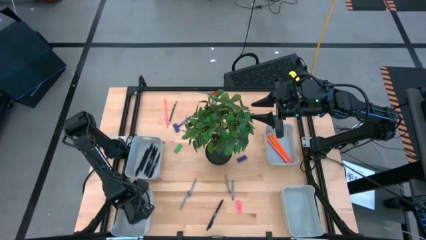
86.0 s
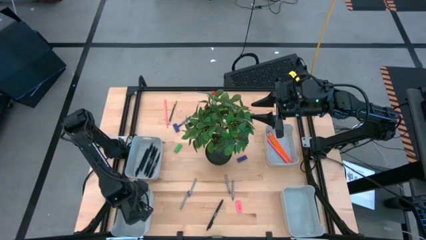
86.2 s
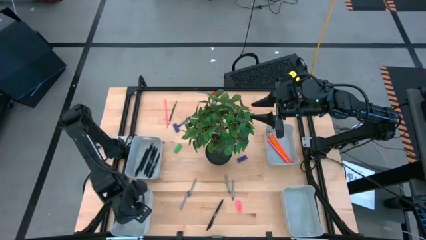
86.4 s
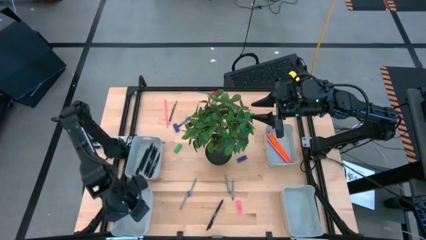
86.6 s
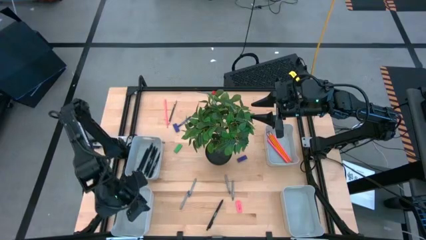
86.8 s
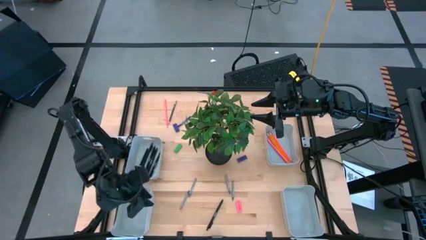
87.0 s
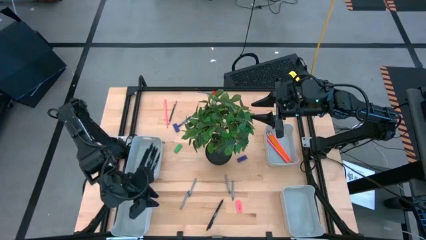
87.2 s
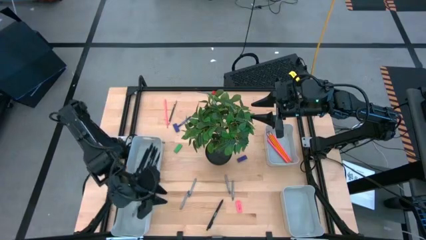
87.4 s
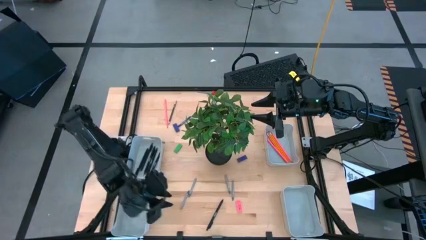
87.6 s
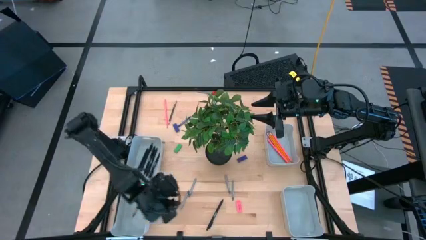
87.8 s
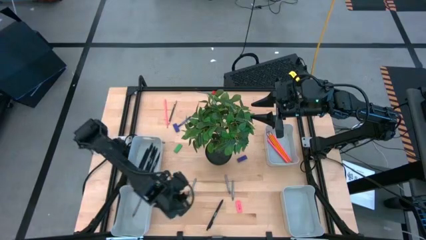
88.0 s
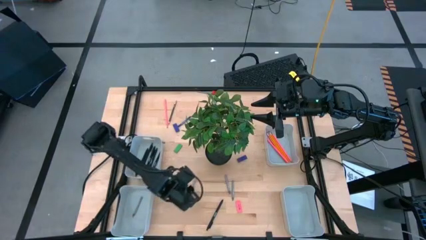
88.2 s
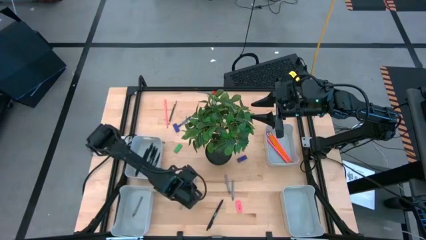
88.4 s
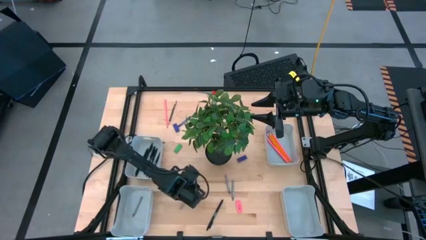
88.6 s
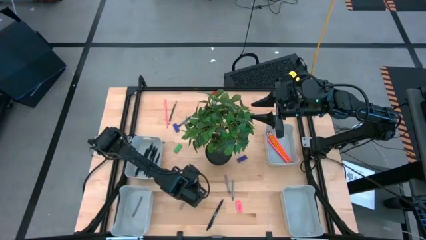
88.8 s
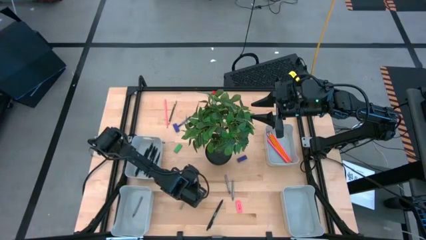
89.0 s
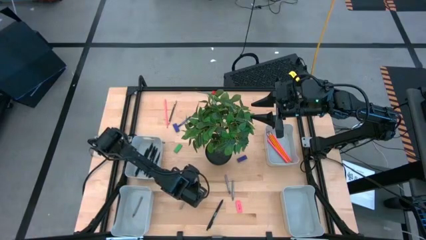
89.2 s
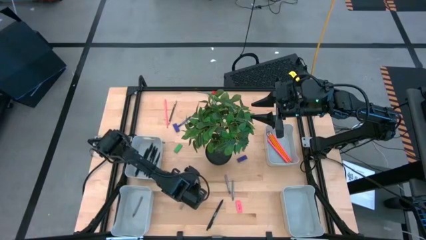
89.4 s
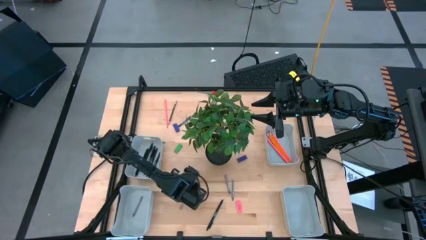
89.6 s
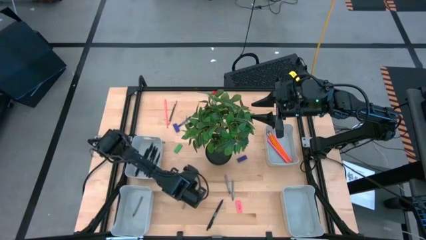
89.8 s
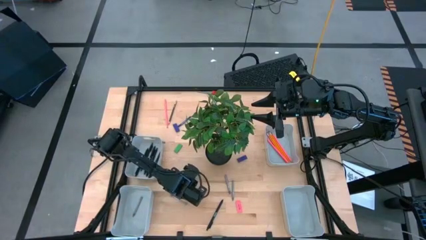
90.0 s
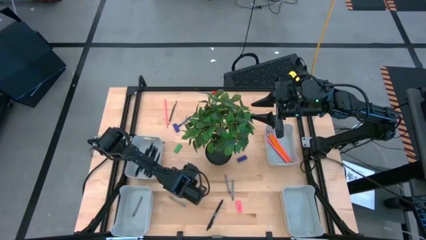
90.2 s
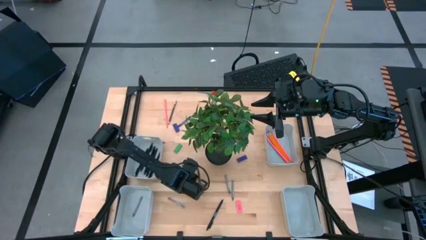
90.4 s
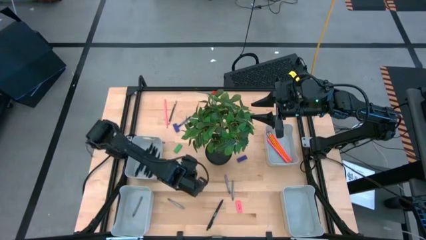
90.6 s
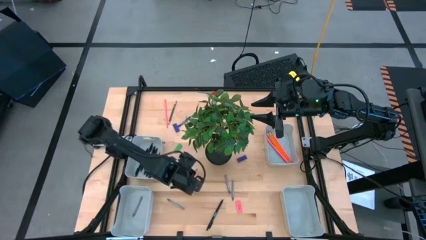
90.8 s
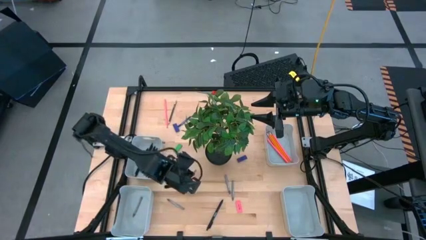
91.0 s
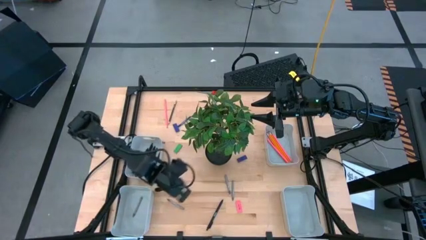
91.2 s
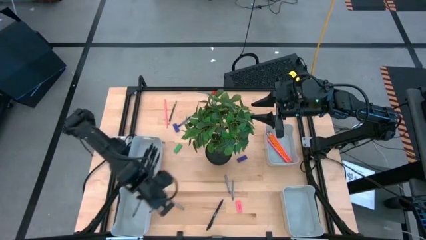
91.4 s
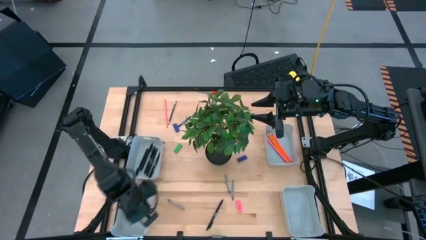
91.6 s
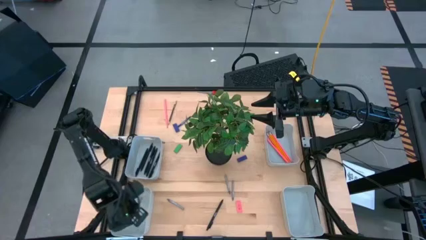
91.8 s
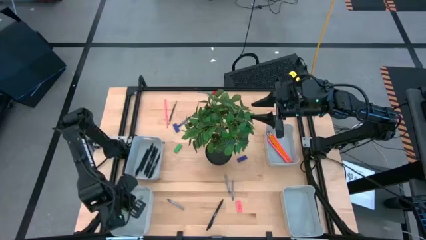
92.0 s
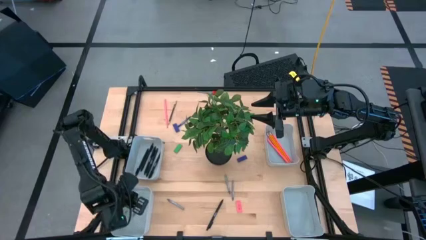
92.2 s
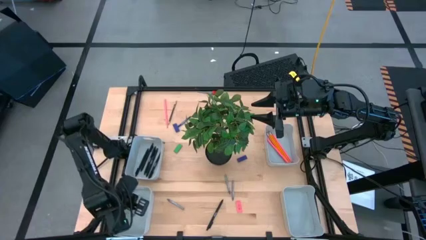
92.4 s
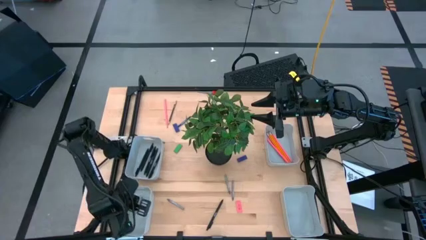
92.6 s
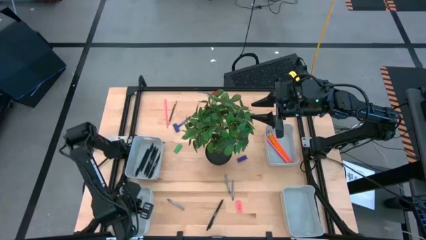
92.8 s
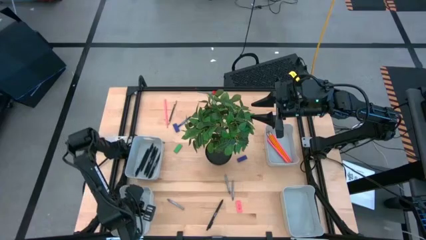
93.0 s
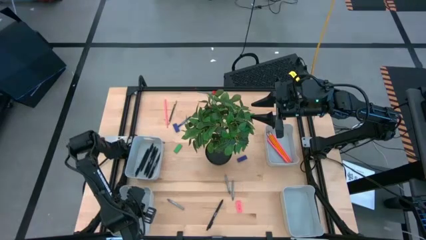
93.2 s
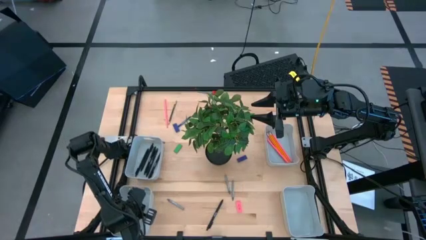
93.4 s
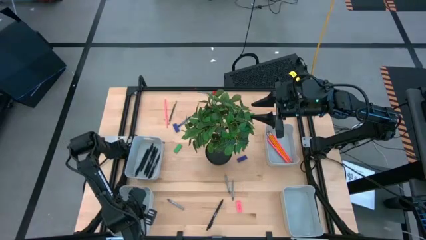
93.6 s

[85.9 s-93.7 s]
Task: Sort crayons/erasers/pens/pencils in bins
Put the gray crayon into the bottom left gray bin

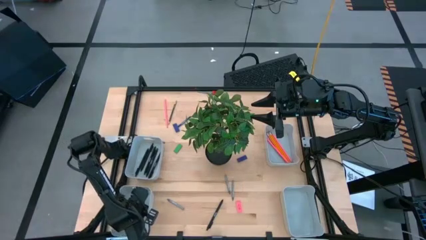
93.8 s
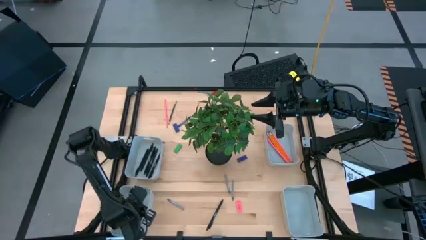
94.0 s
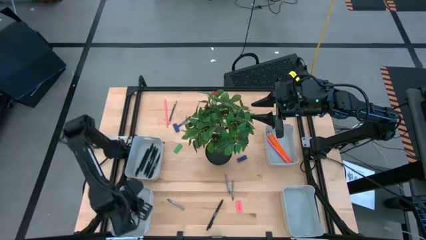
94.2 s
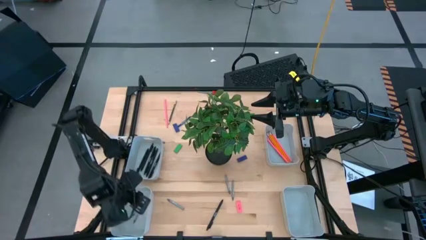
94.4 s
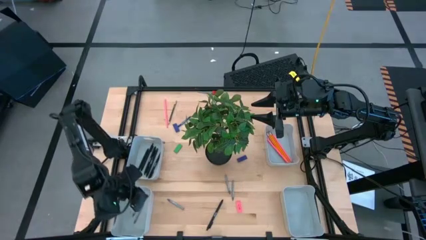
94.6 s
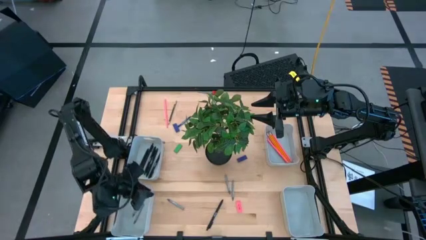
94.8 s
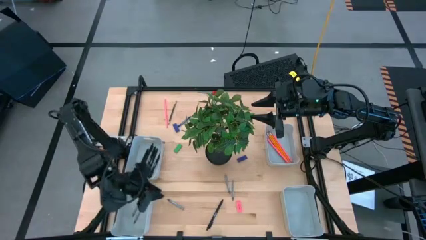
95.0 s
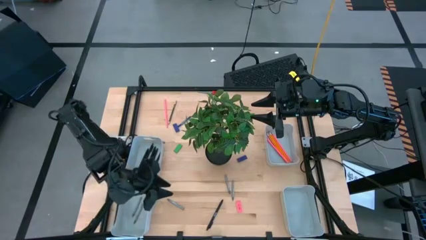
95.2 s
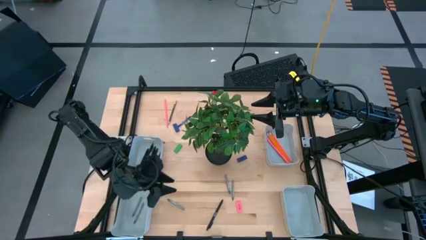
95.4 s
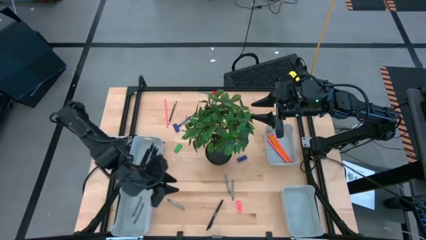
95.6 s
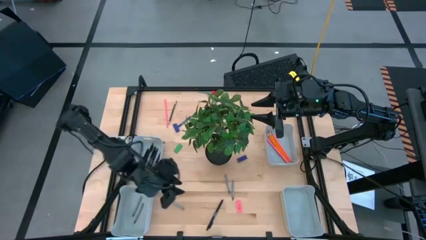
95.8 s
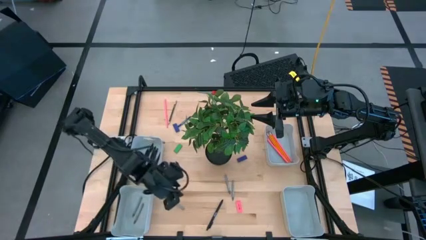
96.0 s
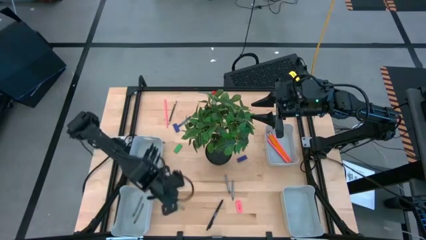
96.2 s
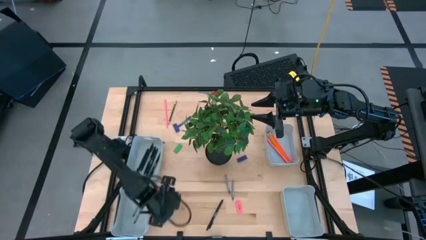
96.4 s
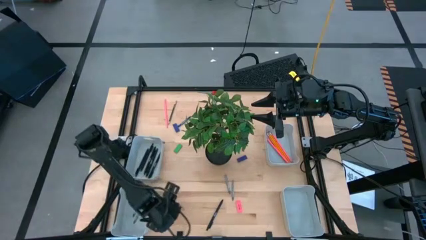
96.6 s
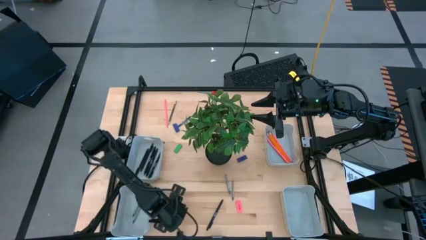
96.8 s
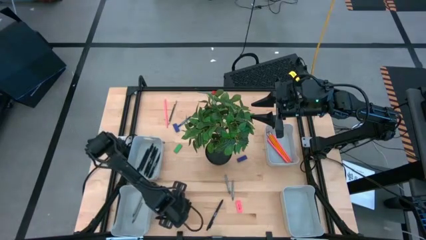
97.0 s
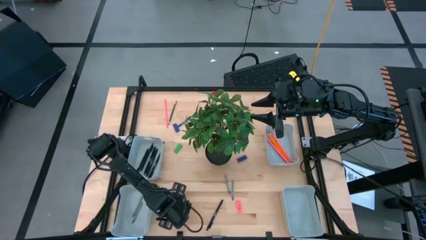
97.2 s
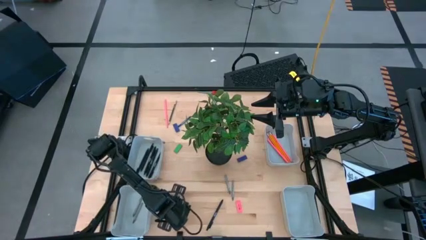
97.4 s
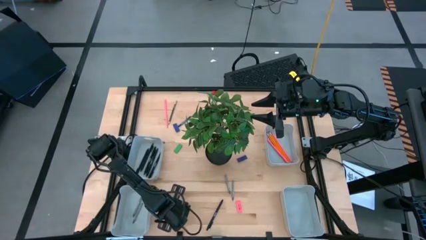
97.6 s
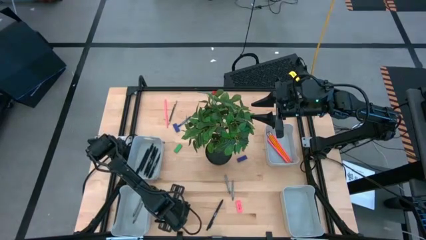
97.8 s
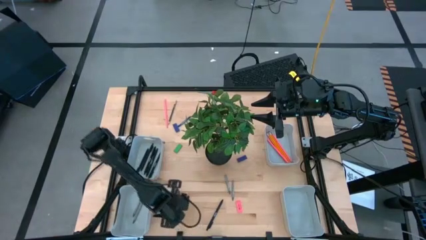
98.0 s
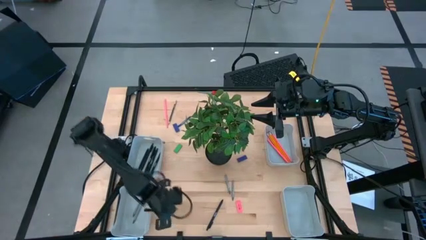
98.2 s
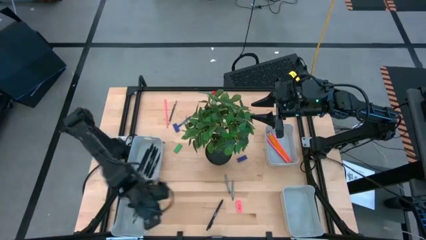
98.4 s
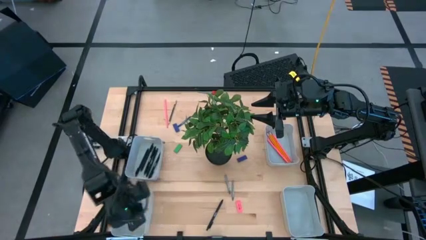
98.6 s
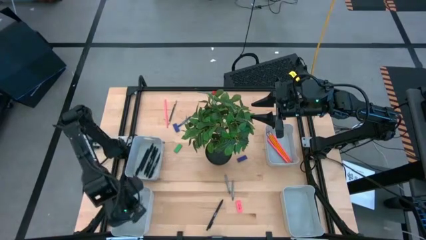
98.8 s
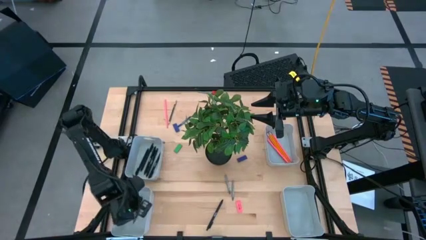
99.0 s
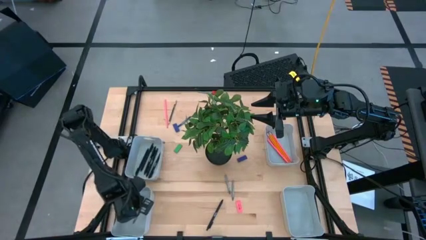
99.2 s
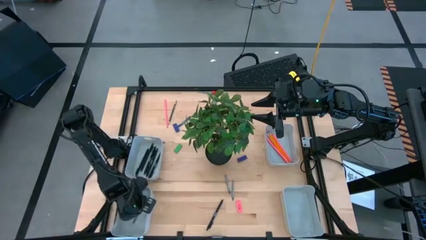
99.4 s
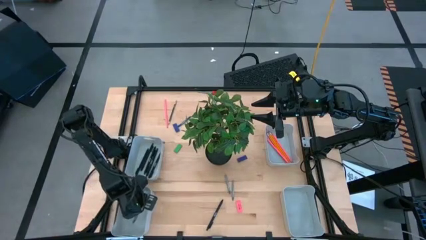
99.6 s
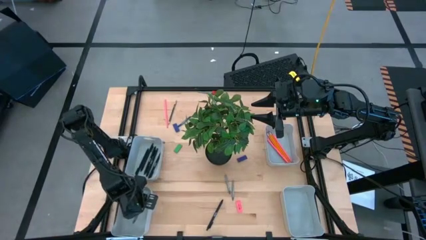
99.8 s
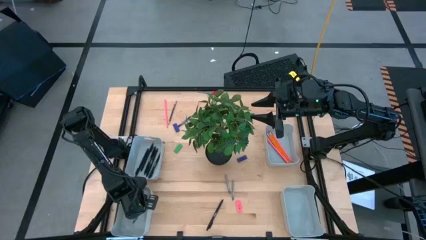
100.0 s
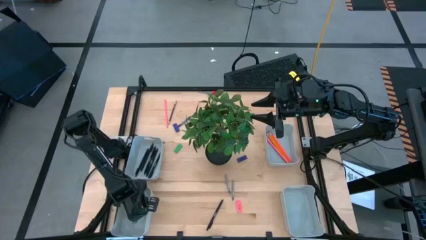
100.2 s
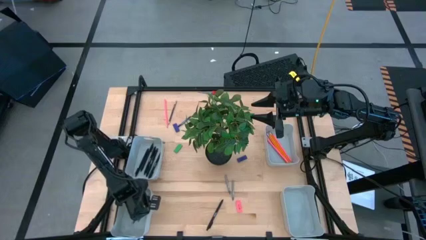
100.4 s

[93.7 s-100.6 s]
Put the gray crayon into the bottom left gray bin
